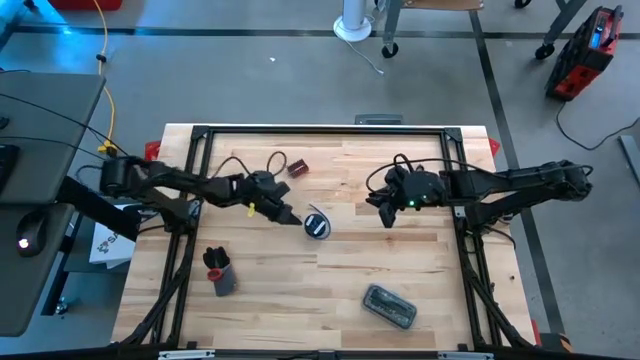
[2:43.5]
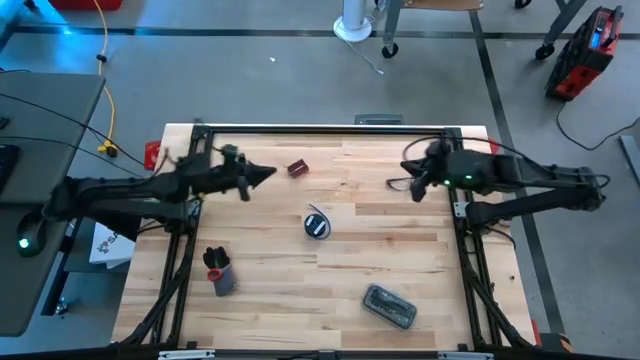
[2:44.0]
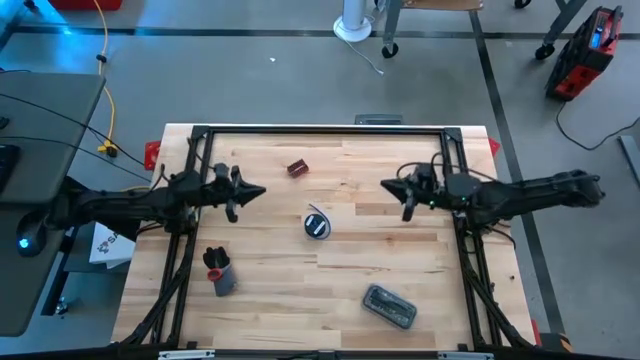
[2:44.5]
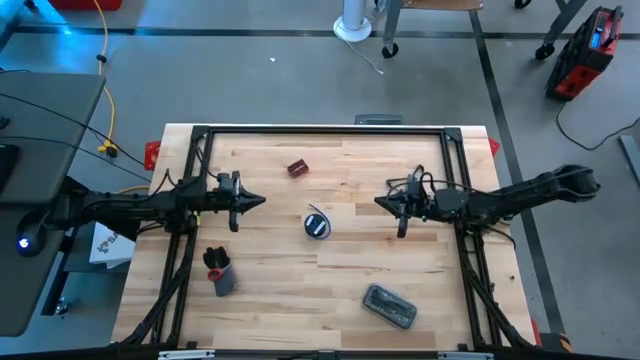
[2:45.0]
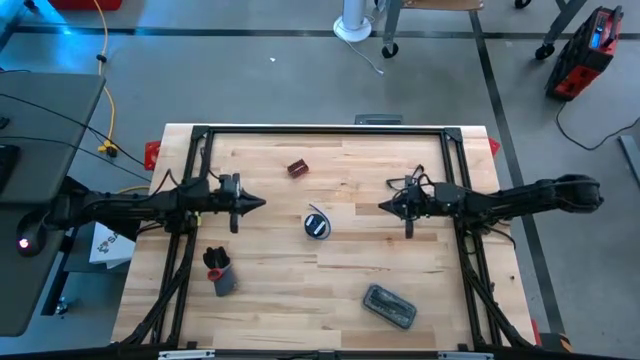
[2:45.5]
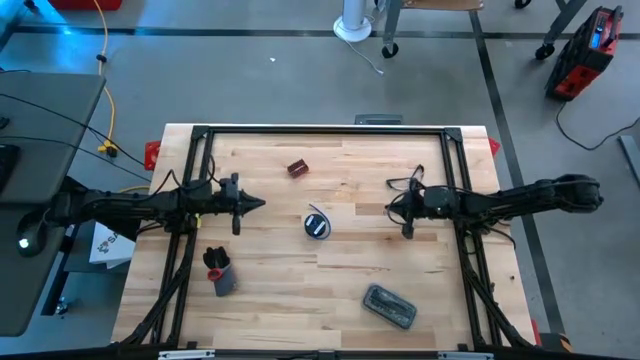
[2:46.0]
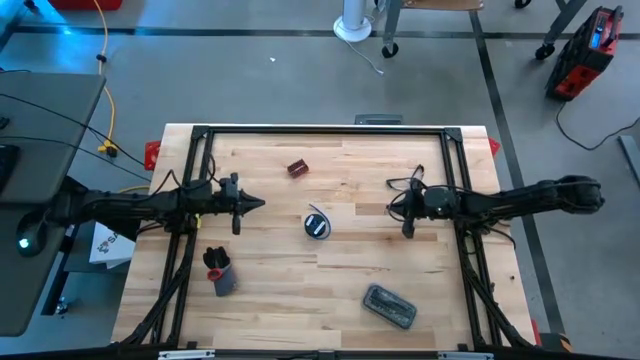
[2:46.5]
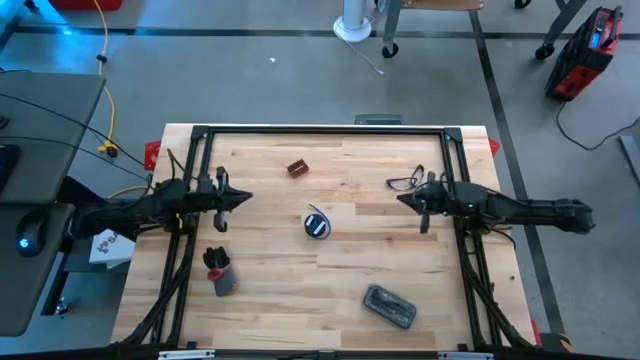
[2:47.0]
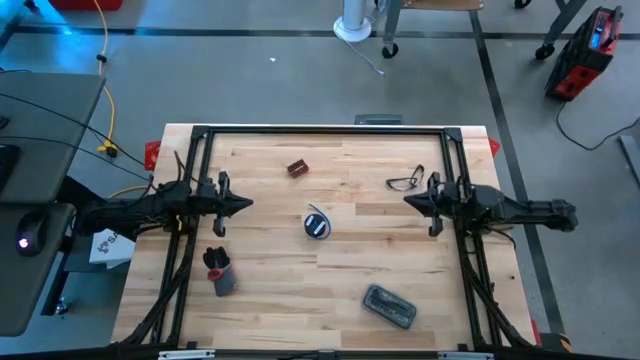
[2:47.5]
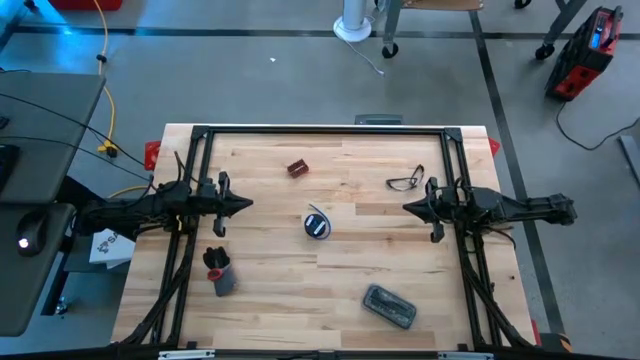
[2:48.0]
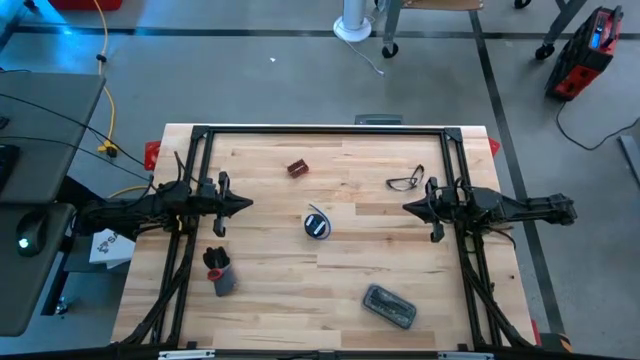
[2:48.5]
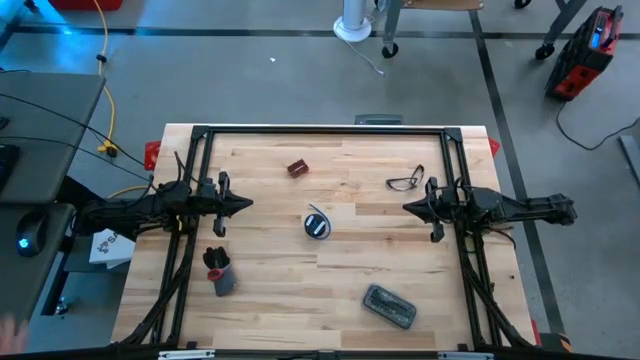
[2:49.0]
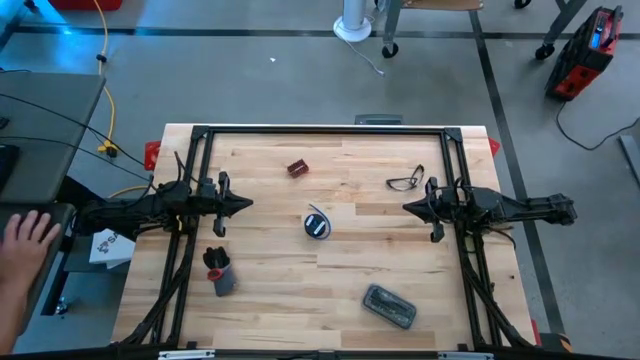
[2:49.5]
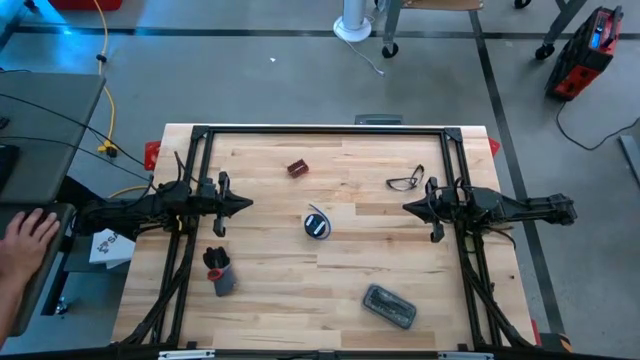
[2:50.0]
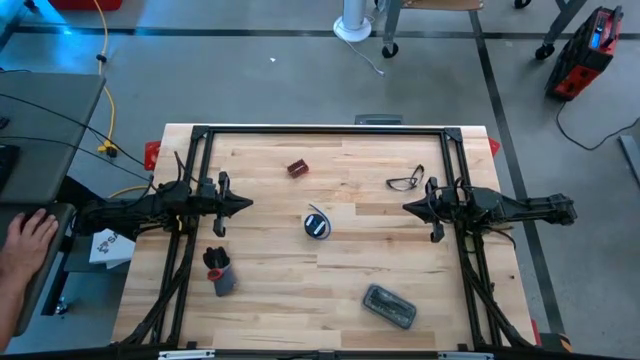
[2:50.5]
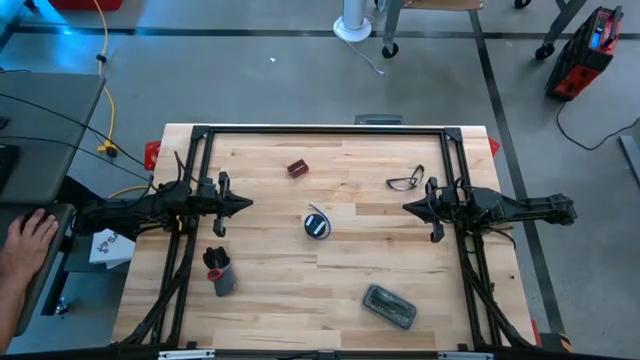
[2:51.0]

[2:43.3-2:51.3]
Task: Coil cords
Return to Home Position

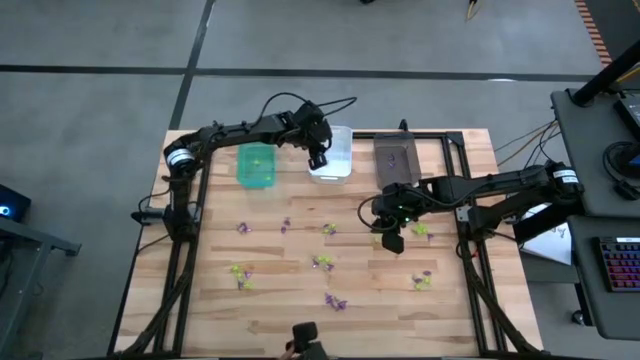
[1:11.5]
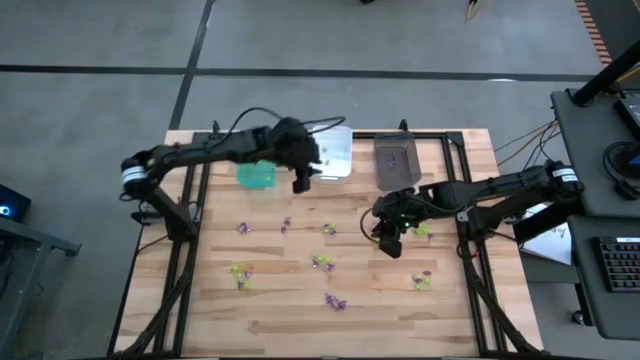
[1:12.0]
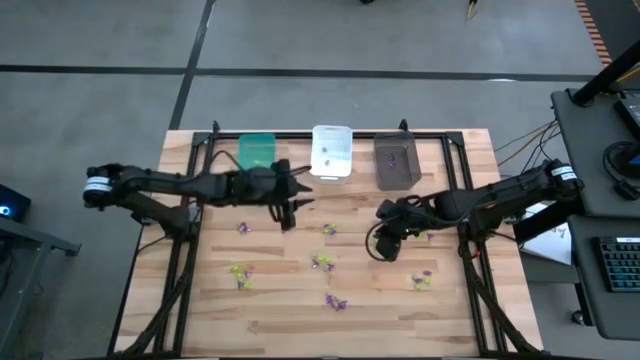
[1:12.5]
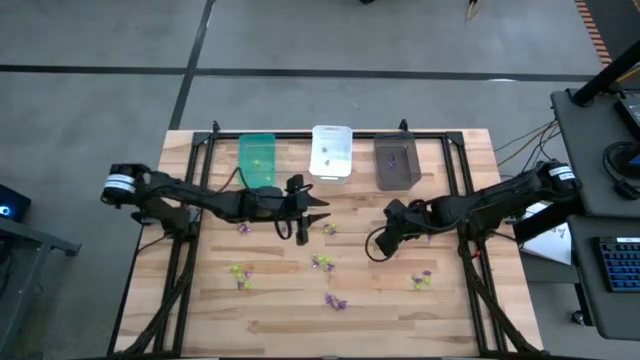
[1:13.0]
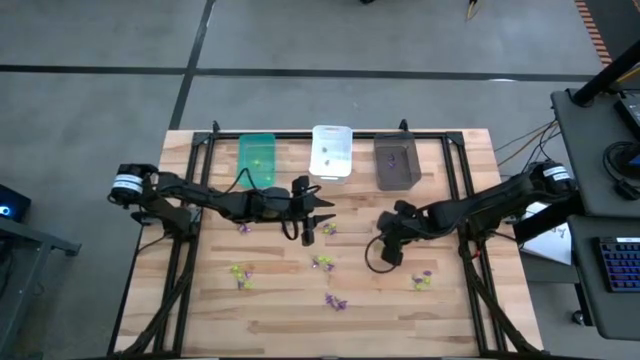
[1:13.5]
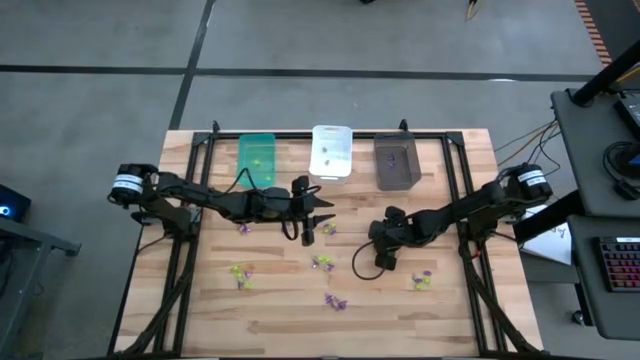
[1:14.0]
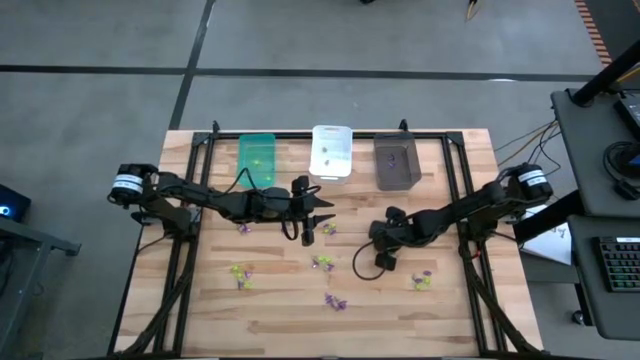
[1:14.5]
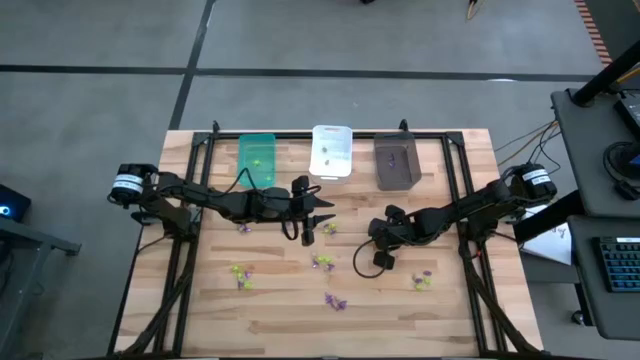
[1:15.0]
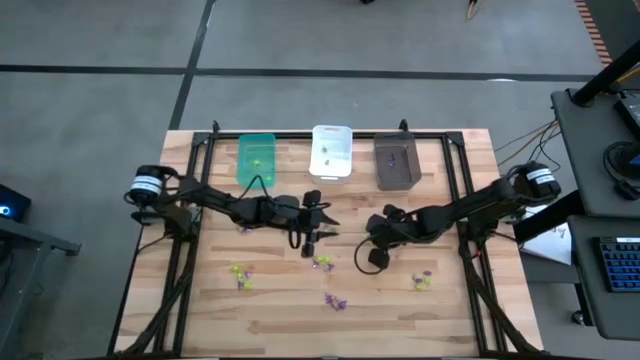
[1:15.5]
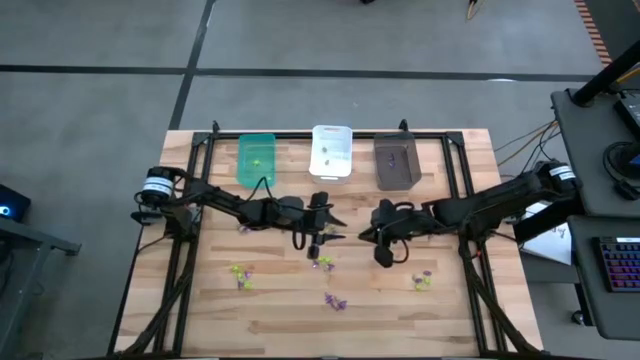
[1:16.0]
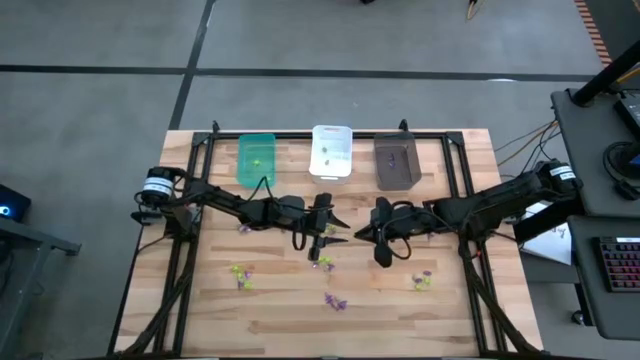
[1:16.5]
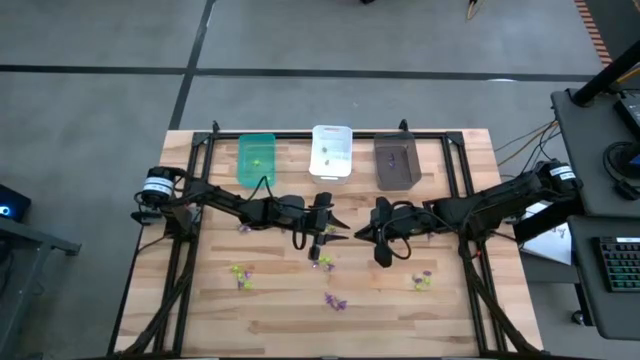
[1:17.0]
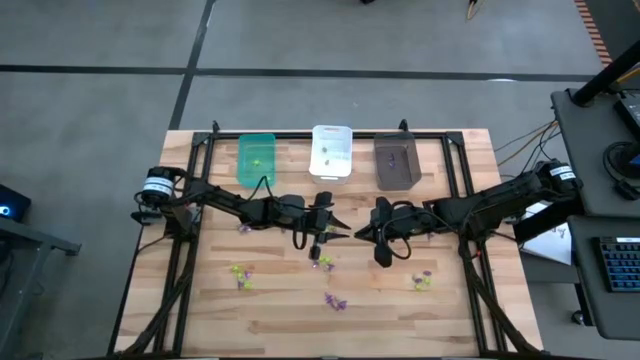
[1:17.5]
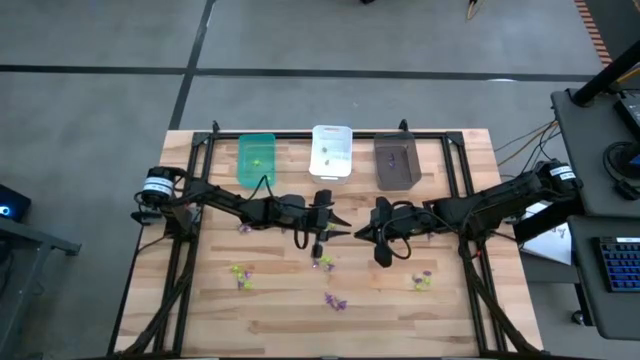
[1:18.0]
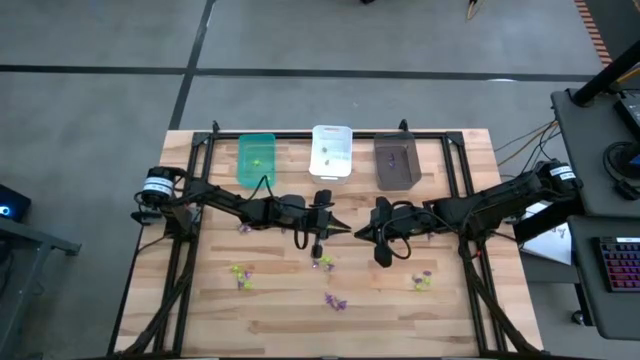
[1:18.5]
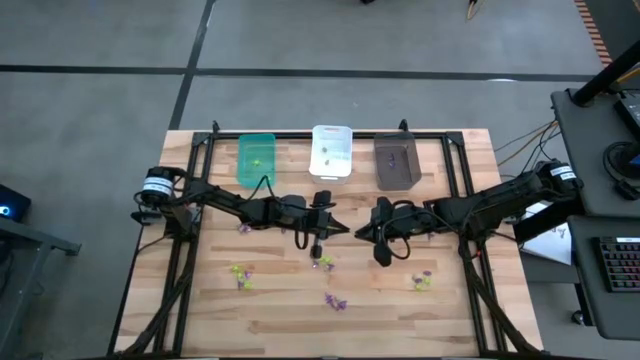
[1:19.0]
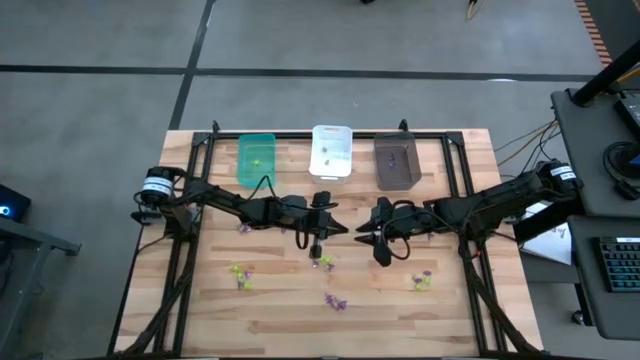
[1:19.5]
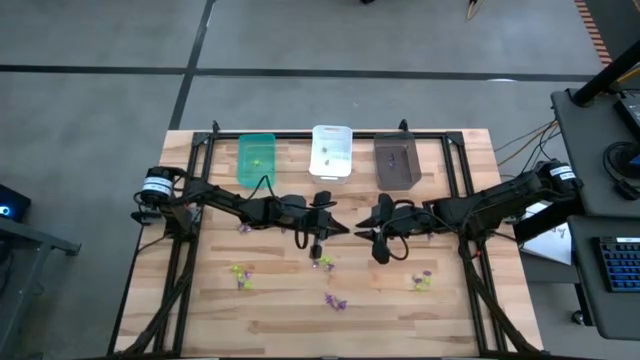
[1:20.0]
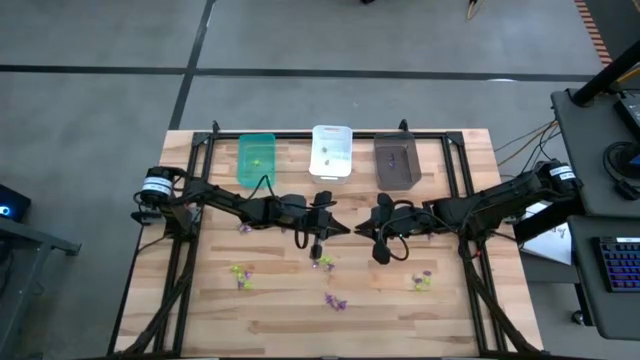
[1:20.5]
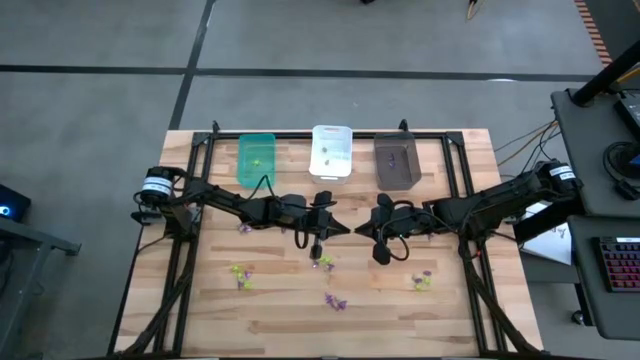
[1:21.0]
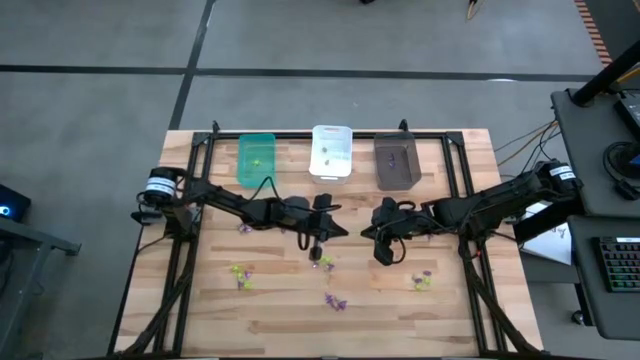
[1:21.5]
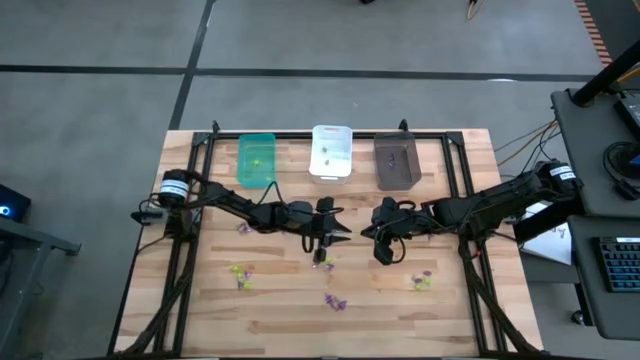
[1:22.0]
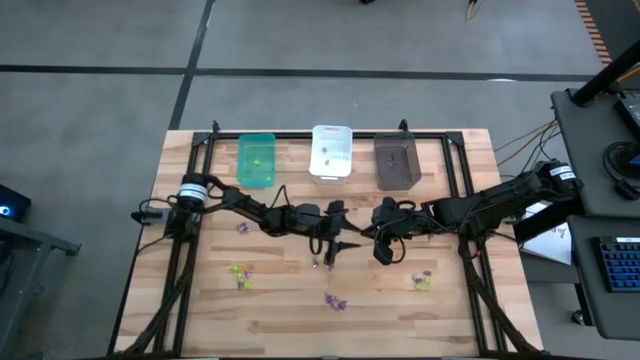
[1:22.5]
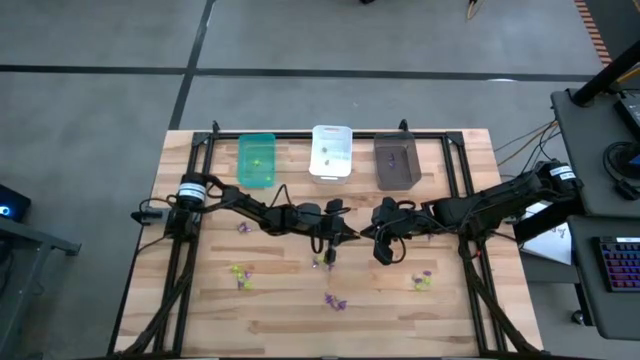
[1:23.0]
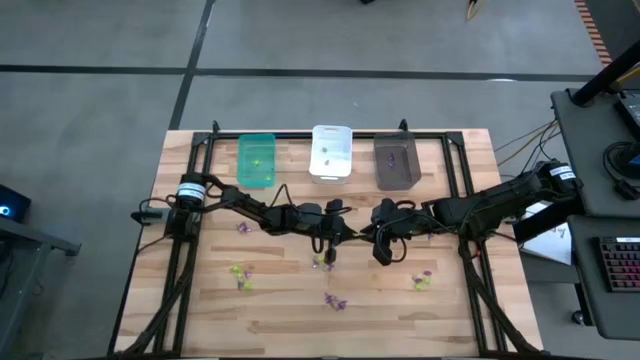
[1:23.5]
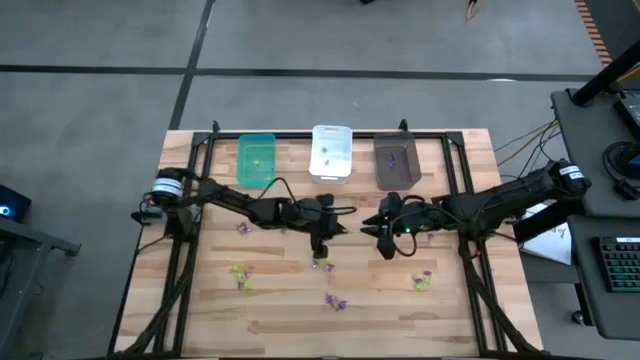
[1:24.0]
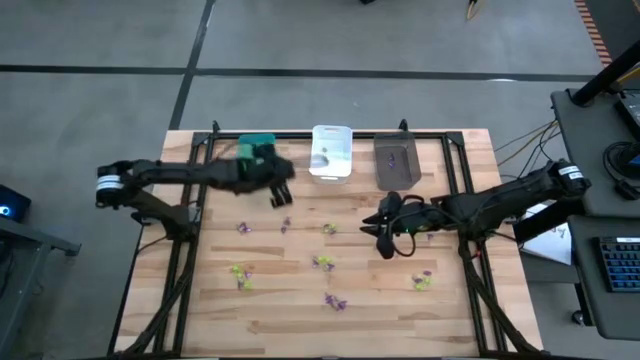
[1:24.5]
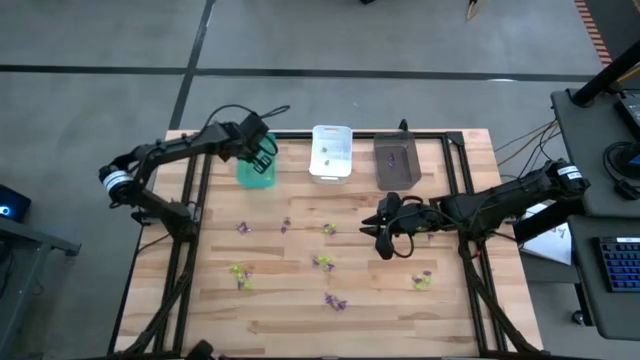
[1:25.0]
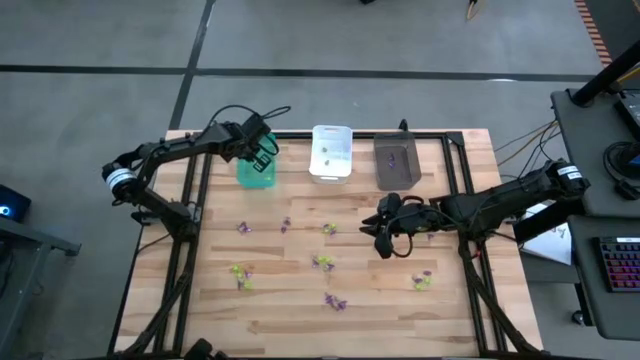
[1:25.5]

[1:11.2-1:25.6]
Task: Sort Halloween decoration
Put the green spider toy into the blue bin
